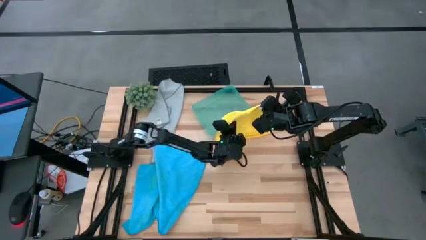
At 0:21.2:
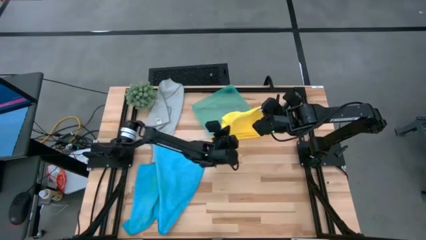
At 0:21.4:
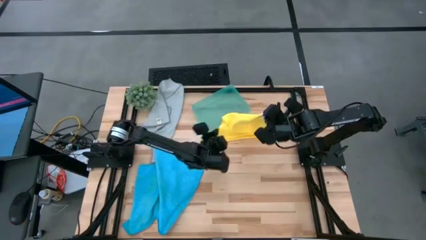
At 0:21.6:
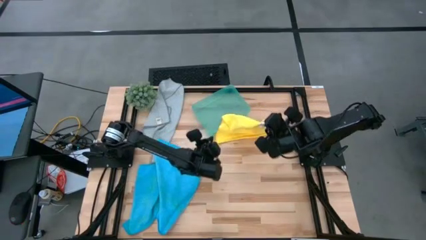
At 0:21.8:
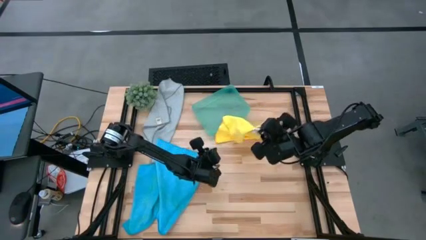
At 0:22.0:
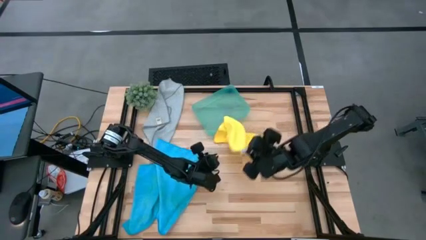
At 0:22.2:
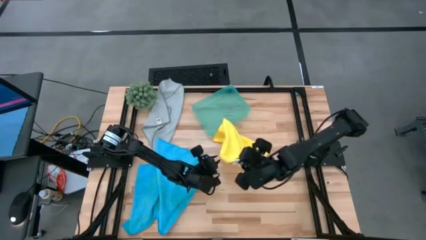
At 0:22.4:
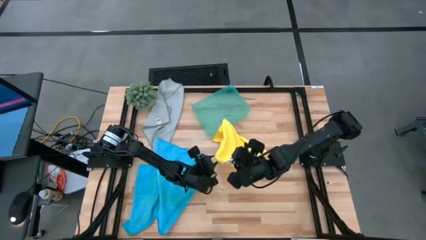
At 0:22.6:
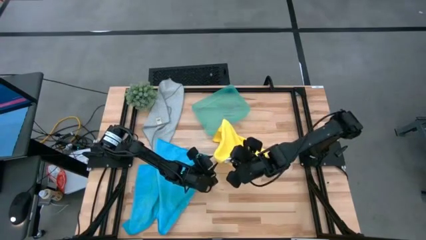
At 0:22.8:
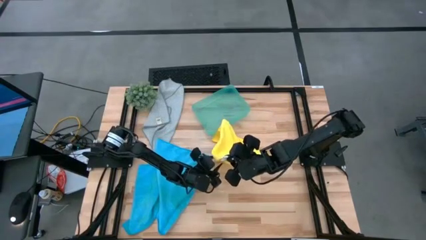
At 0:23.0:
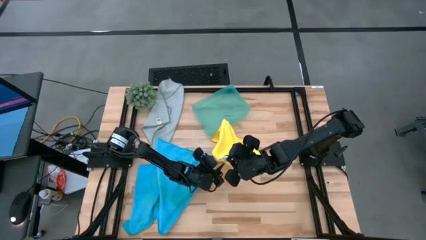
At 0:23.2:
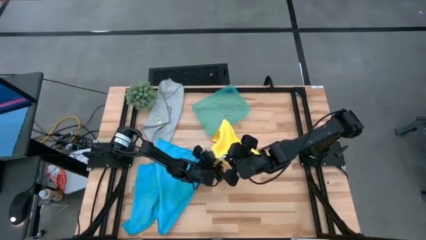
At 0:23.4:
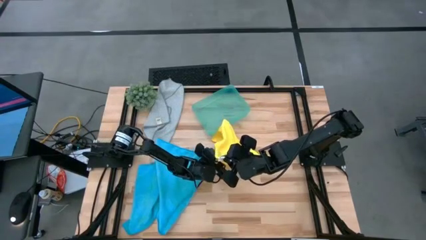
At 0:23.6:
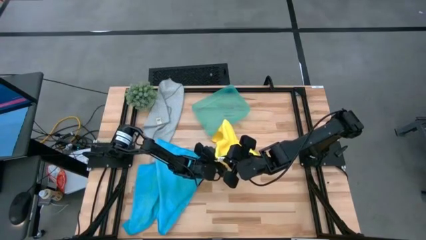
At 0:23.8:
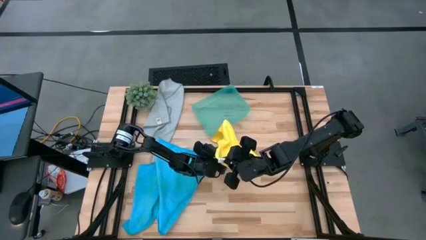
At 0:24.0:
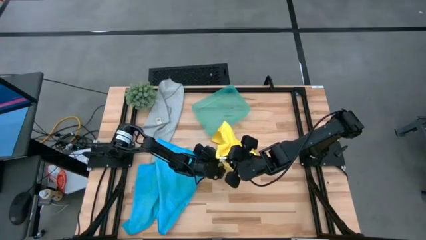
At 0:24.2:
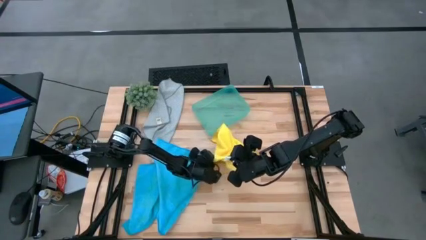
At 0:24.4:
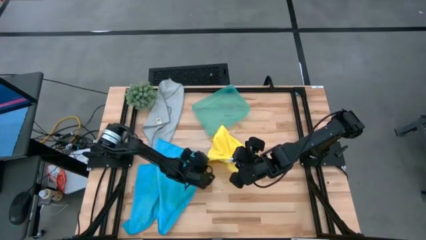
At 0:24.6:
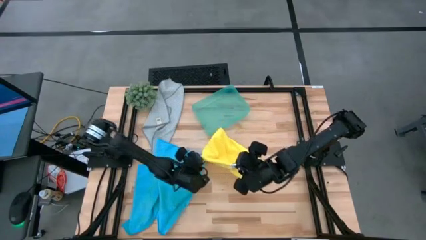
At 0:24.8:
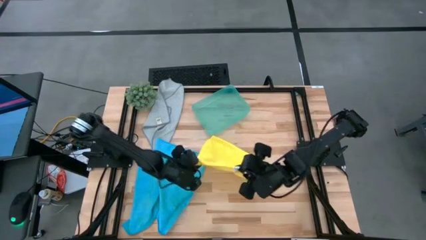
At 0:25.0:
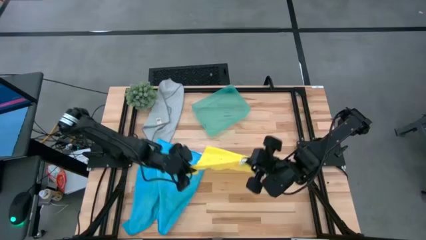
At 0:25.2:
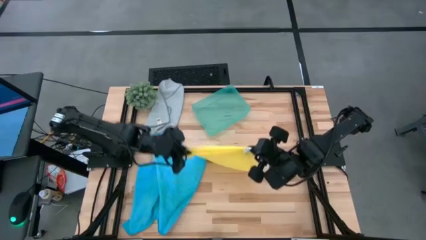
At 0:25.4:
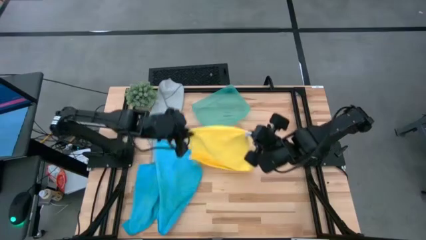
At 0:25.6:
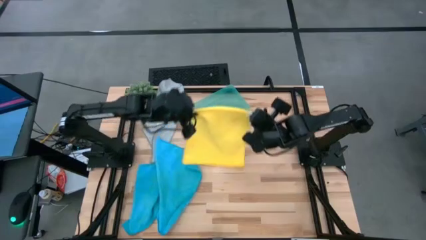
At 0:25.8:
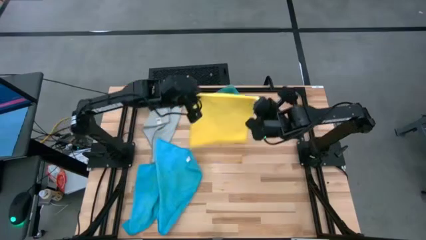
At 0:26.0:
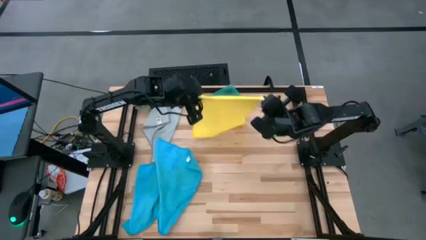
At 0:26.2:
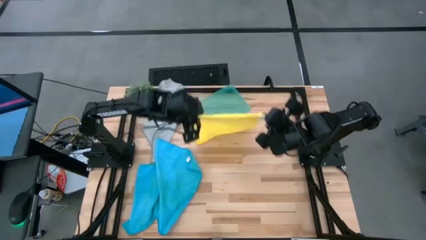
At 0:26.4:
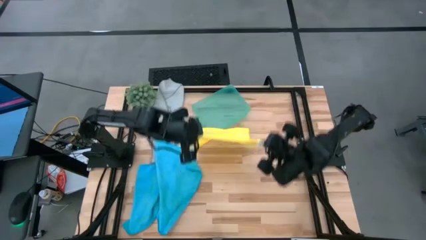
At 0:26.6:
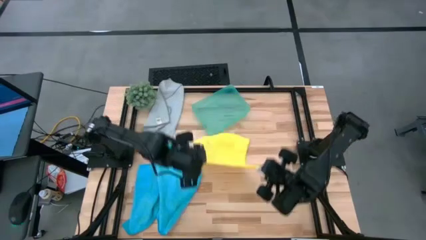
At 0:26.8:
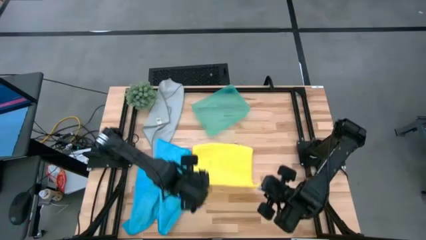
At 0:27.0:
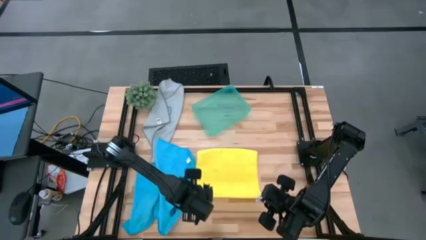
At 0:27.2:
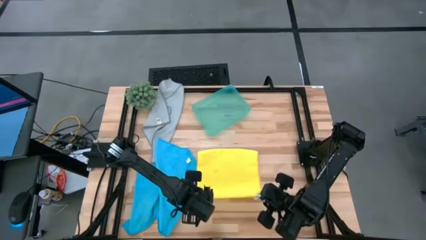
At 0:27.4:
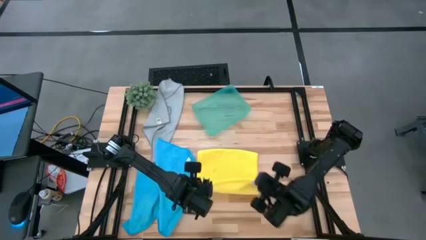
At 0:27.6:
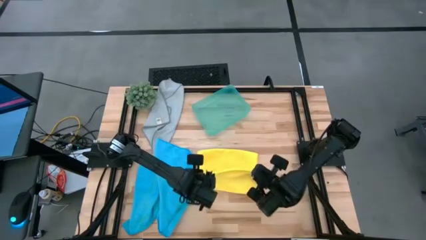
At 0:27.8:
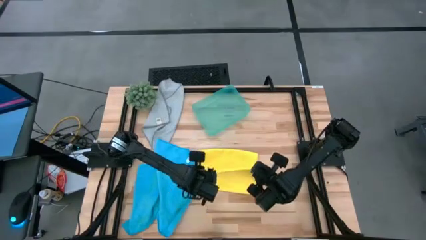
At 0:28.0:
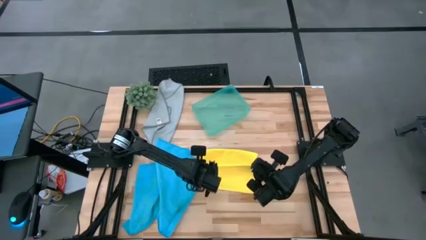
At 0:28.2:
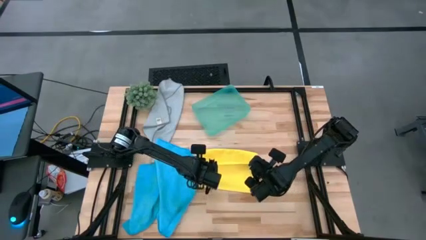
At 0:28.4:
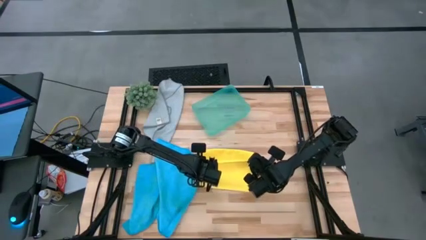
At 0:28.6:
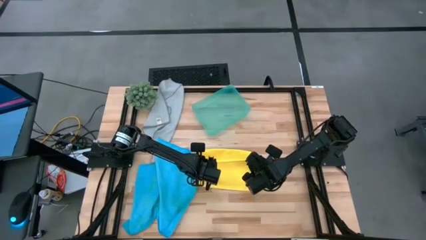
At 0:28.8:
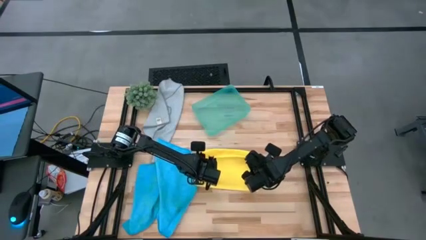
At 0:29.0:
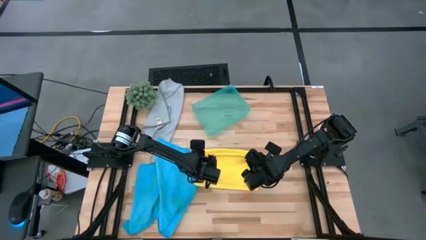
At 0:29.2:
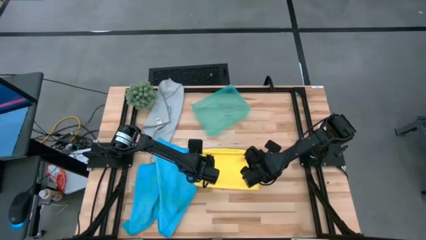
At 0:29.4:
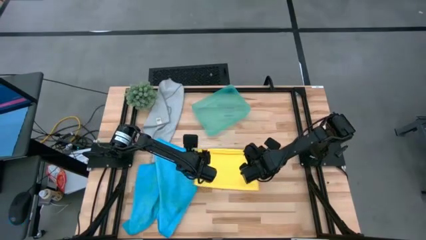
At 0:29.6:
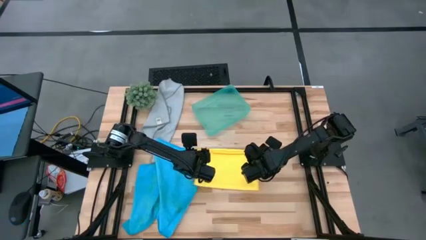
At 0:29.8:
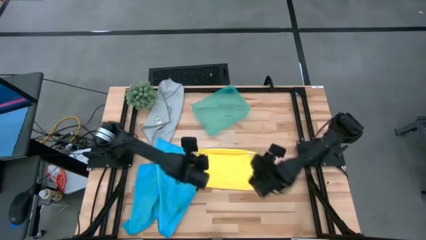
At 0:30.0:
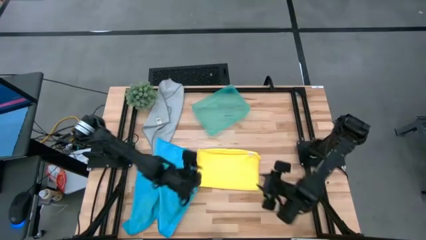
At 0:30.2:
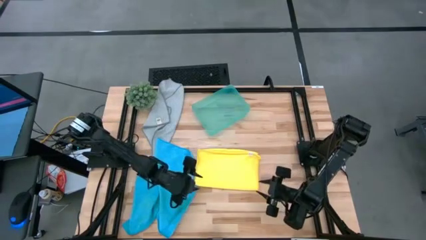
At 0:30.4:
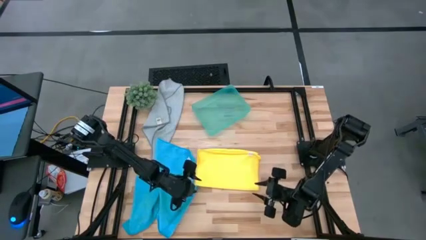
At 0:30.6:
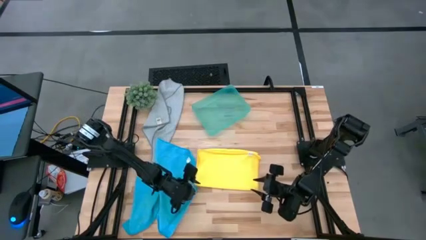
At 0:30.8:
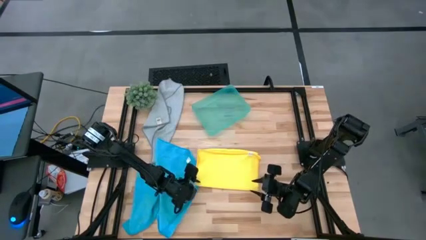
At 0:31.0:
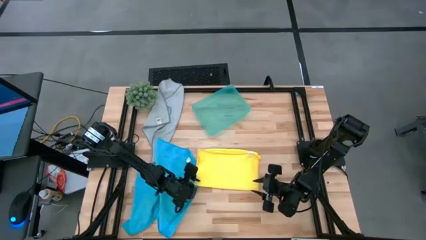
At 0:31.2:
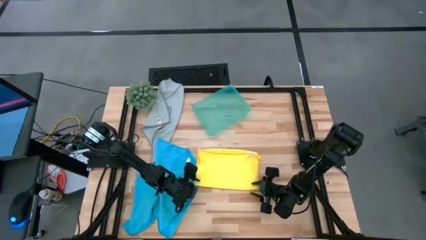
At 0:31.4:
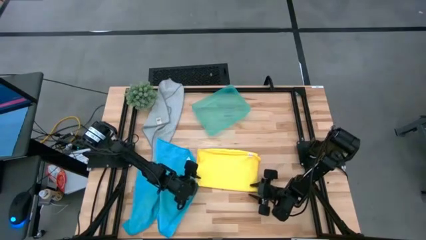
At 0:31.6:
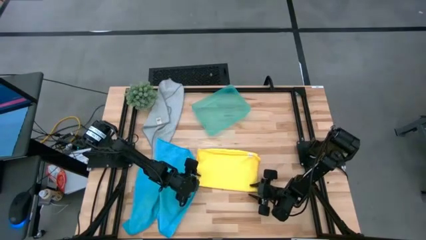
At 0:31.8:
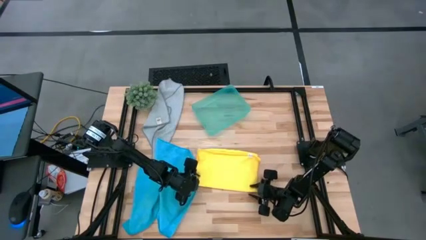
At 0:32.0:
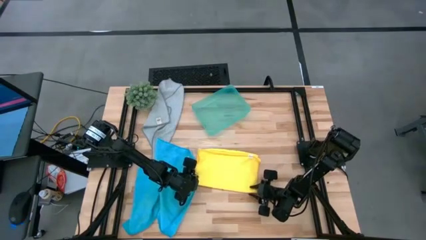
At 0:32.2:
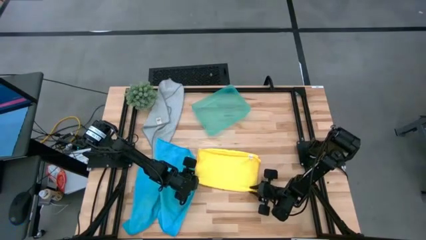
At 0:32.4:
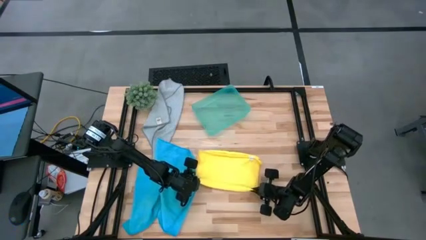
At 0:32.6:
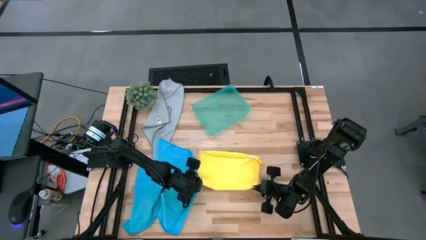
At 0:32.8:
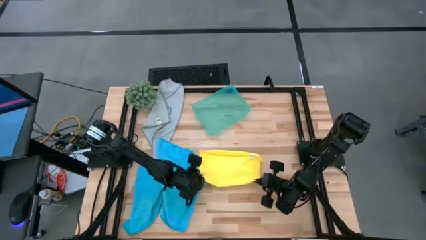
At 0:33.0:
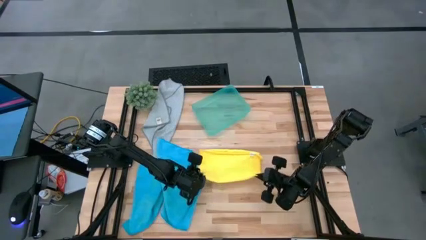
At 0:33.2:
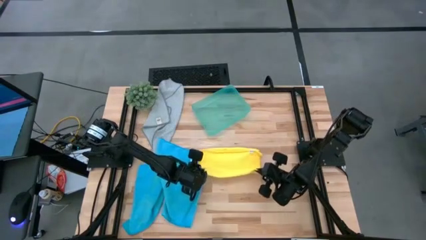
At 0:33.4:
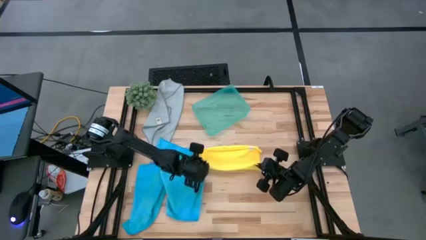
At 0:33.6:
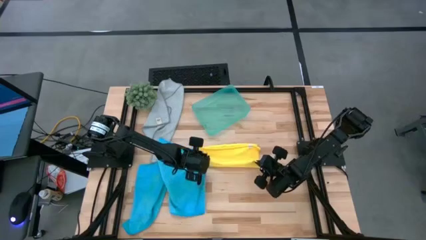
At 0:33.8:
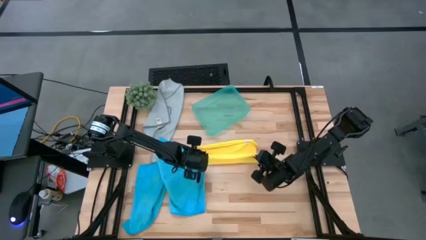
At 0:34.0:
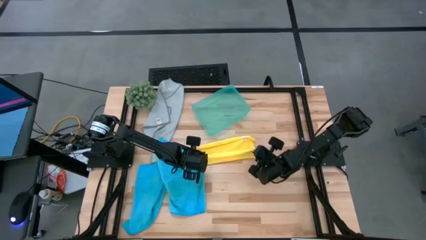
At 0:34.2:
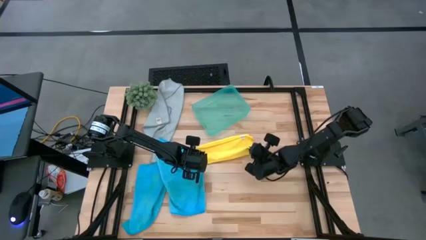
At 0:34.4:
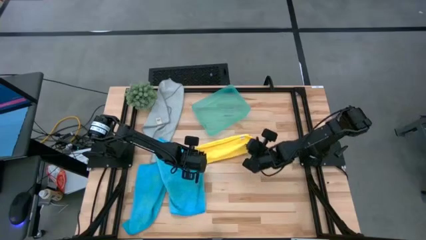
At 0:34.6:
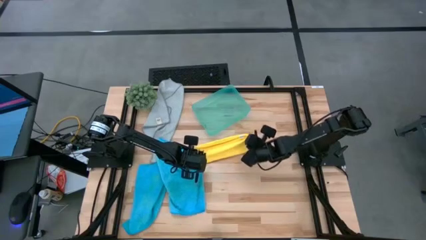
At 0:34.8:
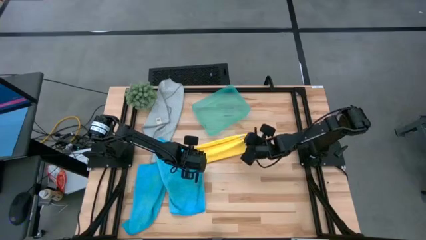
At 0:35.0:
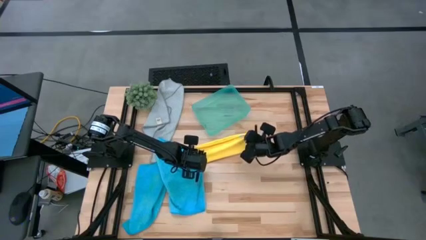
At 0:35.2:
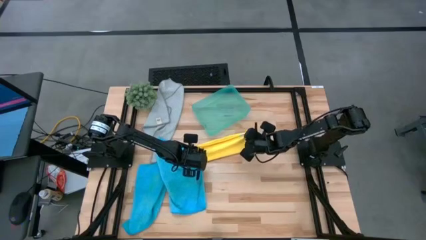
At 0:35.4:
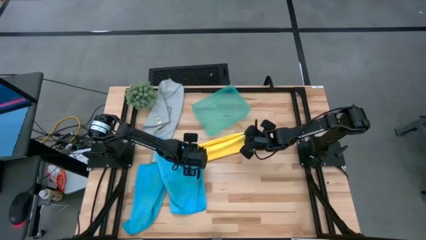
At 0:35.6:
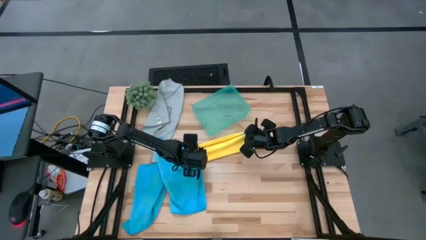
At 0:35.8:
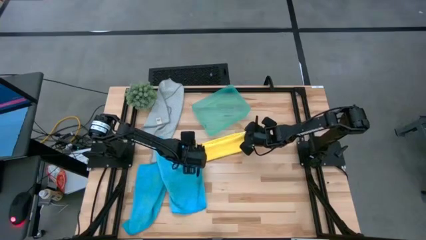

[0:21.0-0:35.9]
Task: Fold microfiber towels
Fold the yellow microfiber towel
